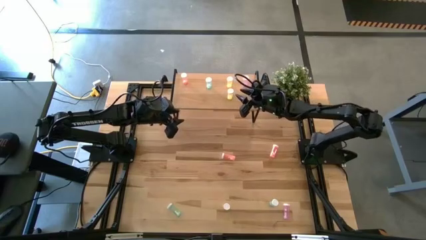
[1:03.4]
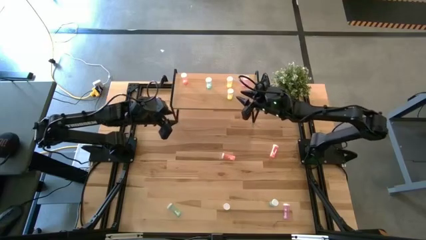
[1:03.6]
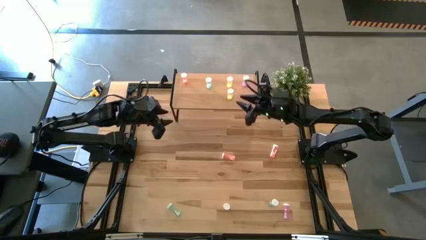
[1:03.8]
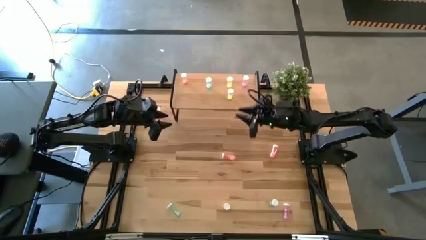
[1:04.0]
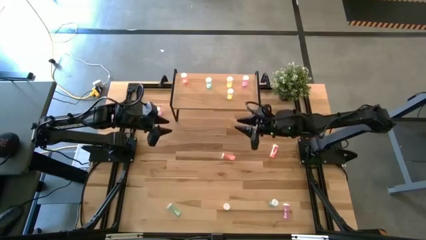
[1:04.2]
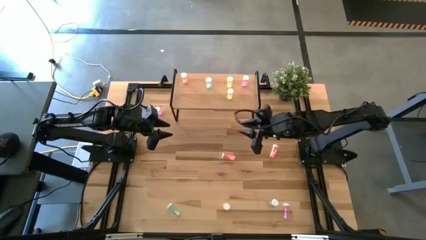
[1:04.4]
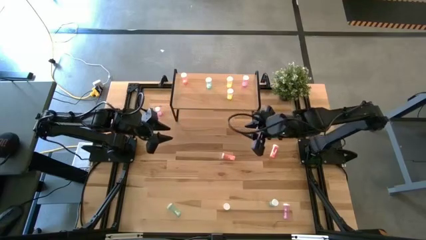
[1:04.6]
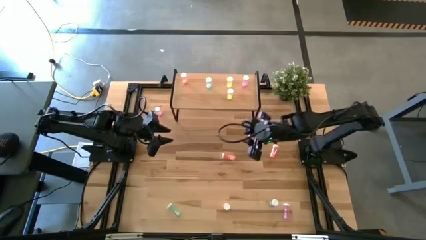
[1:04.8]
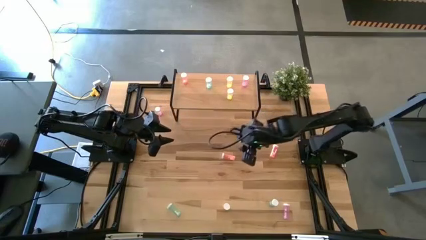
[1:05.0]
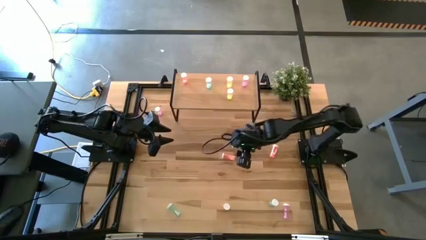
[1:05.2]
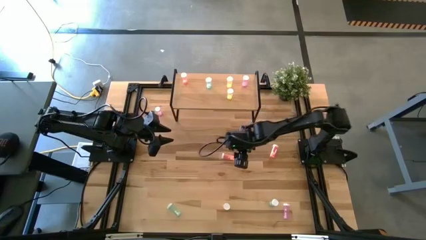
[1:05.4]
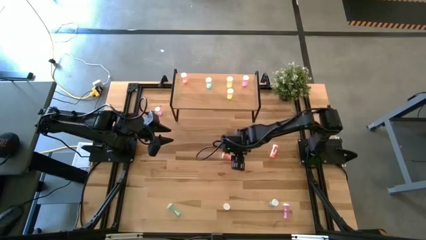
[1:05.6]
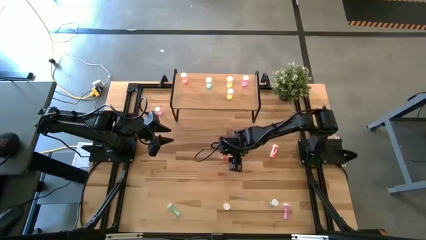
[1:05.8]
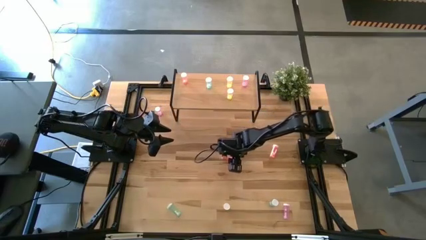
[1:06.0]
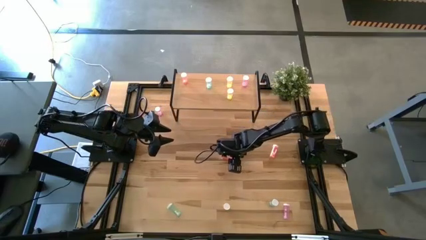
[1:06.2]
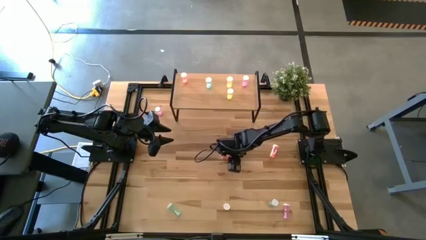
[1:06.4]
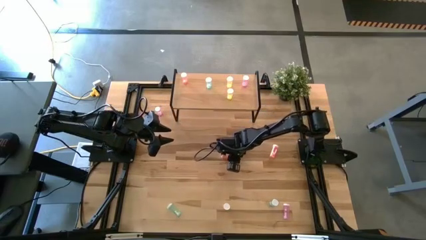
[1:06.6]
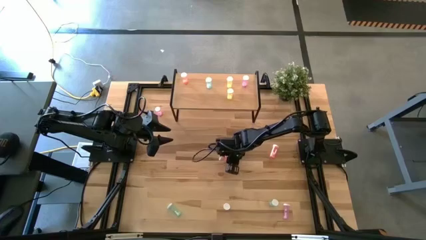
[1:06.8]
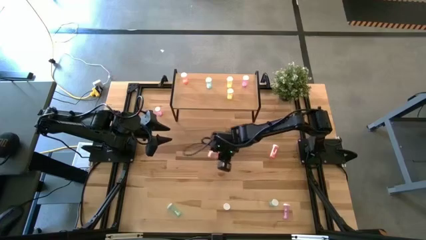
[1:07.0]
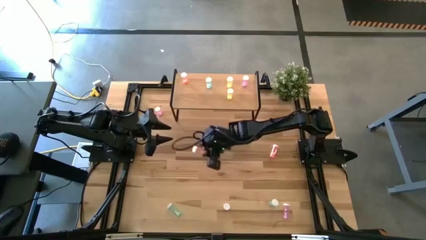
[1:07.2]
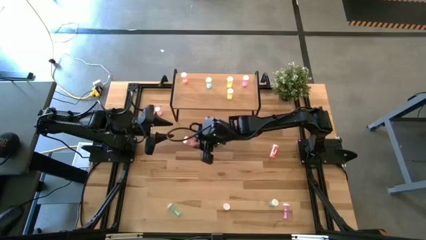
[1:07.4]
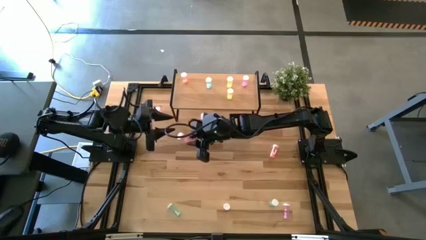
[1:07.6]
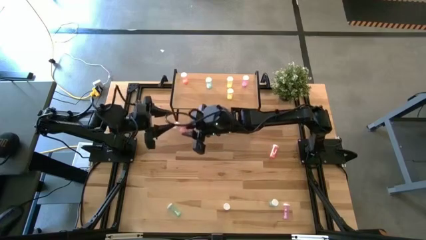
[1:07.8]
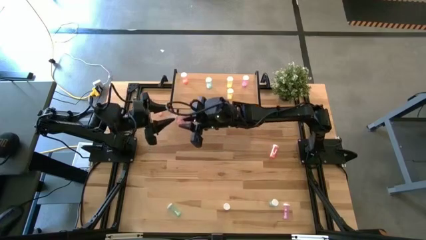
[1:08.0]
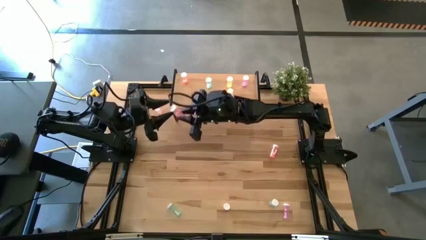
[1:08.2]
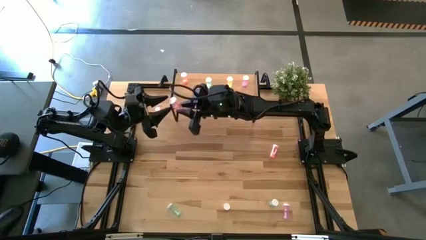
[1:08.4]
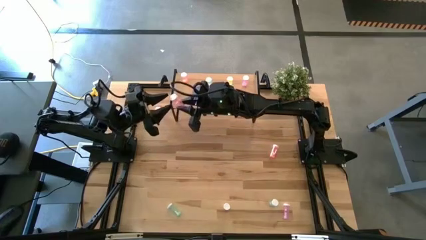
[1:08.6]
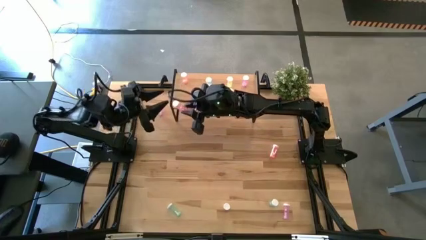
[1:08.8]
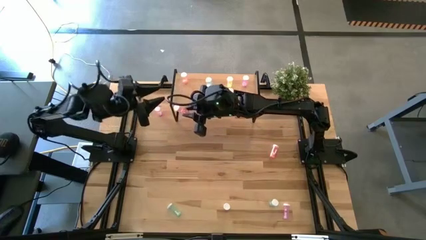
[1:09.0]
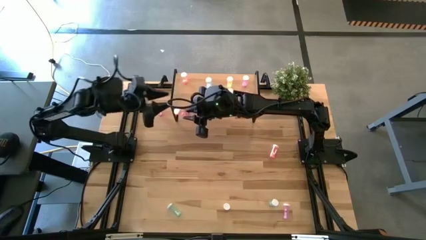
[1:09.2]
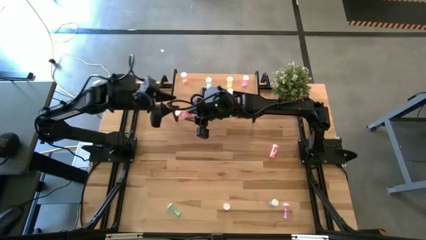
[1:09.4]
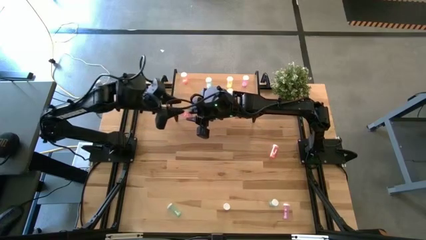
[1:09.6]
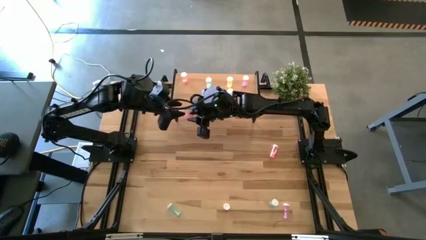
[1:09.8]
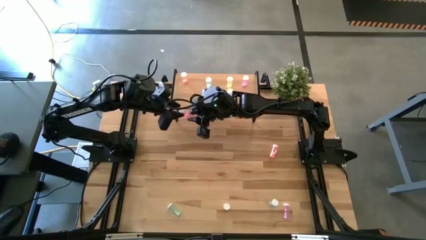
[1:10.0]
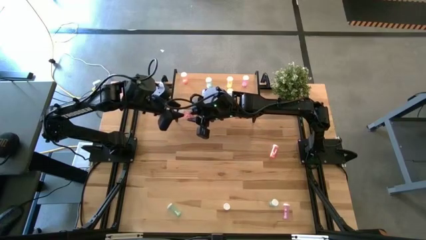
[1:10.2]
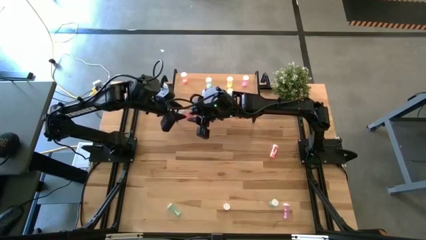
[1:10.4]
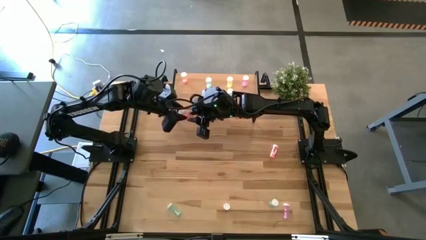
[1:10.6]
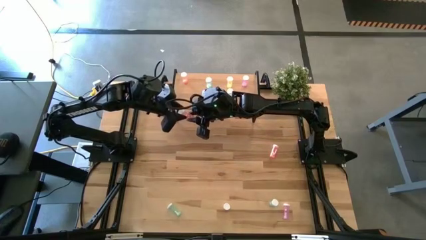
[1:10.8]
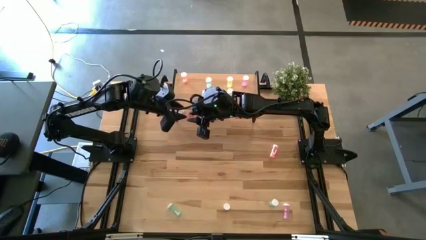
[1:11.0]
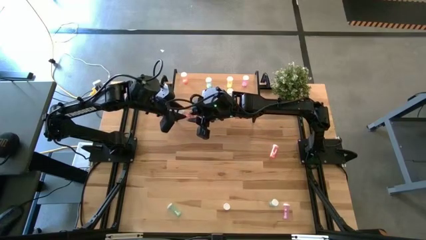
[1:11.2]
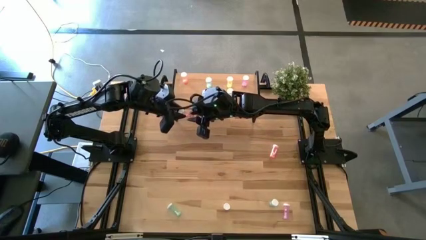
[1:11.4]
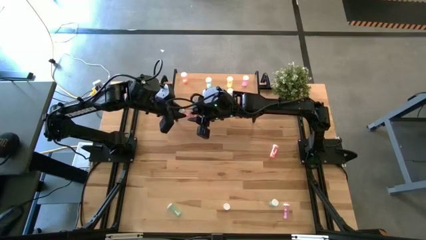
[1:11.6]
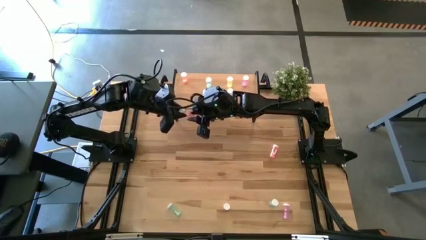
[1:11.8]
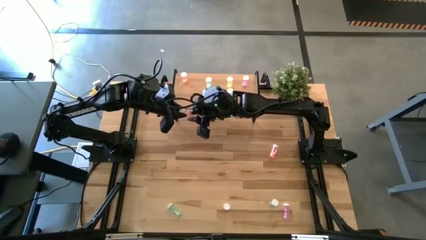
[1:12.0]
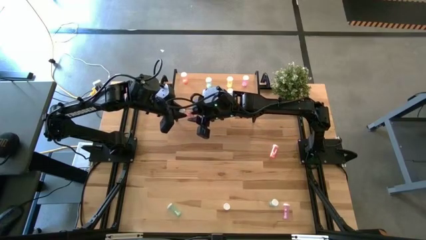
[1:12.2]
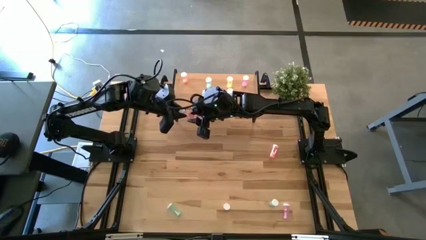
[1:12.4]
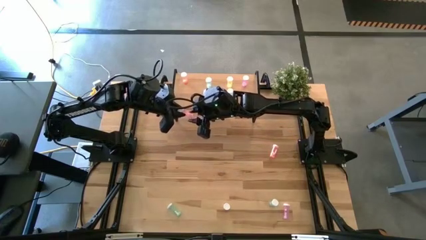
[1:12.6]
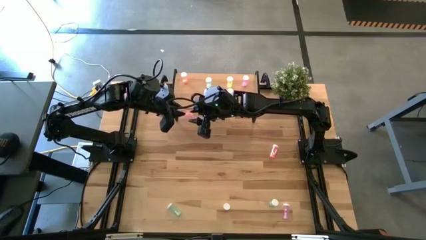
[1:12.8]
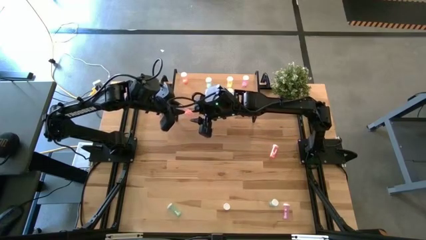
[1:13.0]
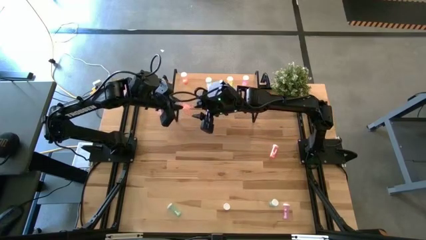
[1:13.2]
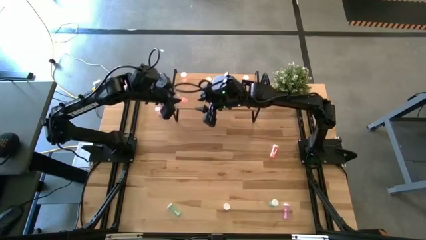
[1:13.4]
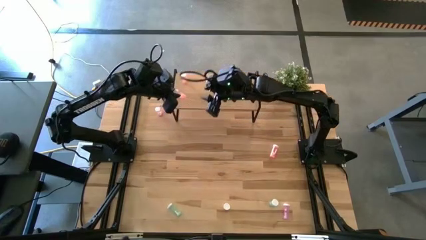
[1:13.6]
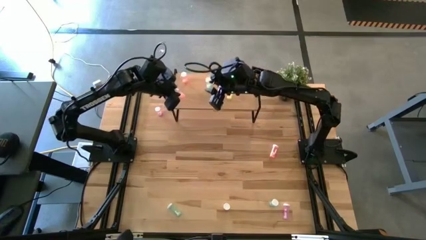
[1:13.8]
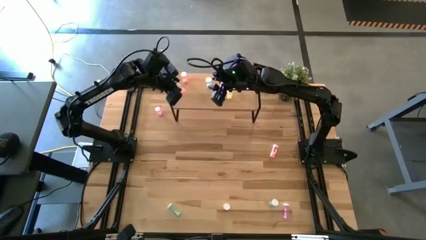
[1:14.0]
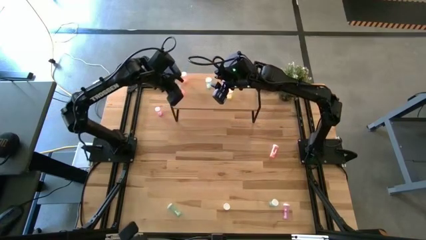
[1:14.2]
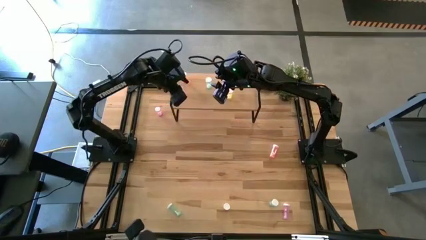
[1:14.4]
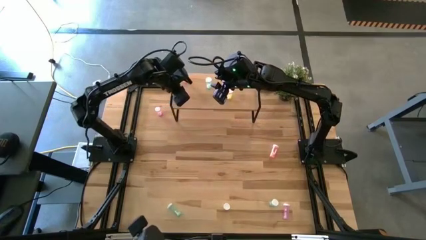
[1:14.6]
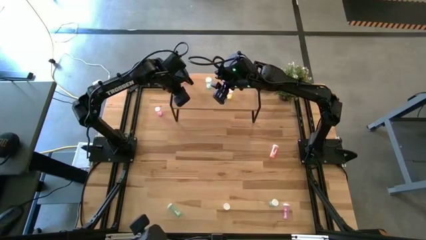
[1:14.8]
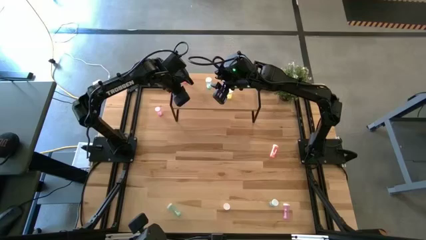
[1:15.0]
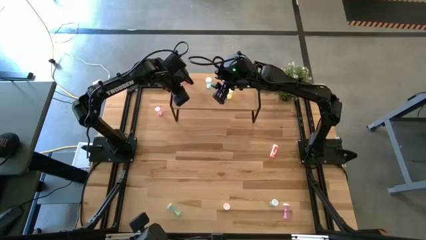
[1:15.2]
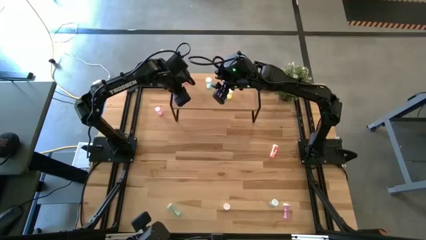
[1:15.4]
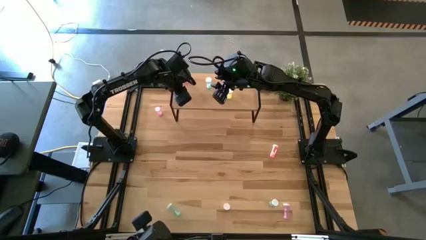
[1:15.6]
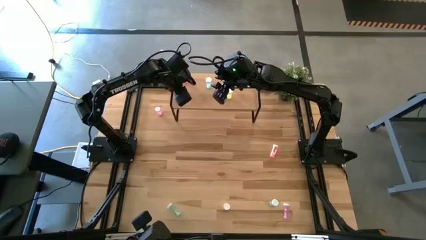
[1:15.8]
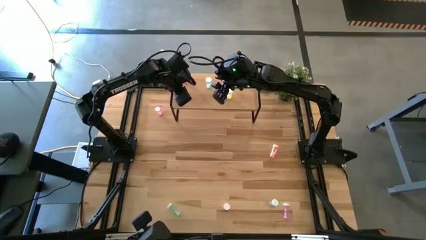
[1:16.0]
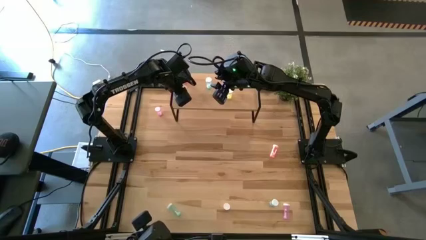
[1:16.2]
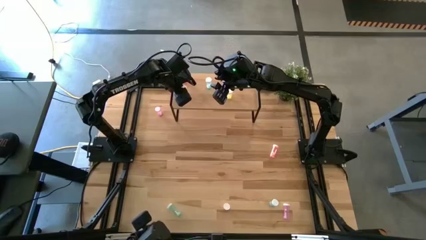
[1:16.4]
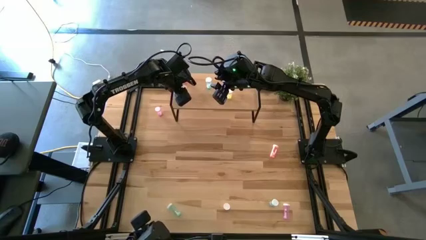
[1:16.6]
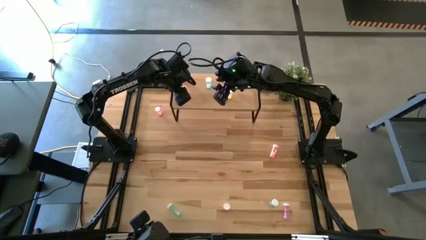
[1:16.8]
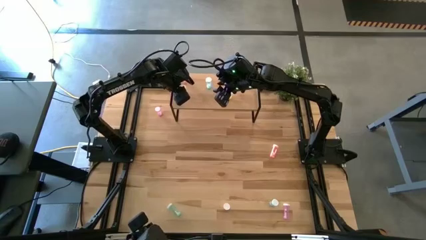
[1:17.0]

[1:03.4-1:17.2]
Task: Pick and place medicine bottles onto shelf by color
Put the left orange pill bottle on the shelf aligned with the other orange pill bottle
